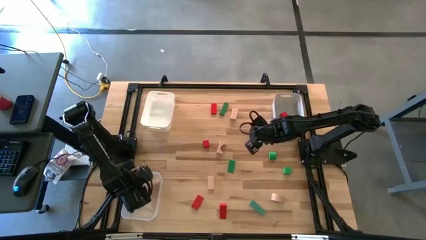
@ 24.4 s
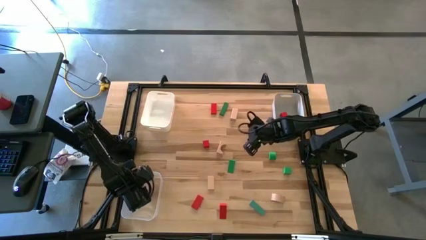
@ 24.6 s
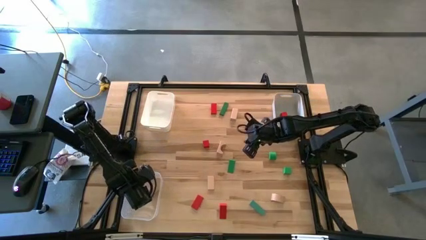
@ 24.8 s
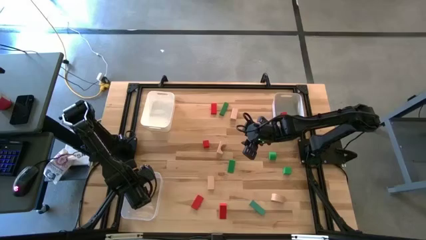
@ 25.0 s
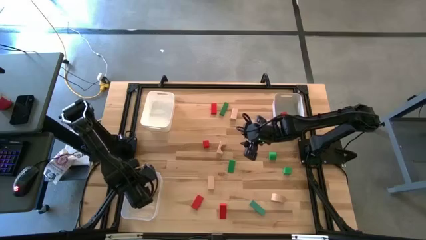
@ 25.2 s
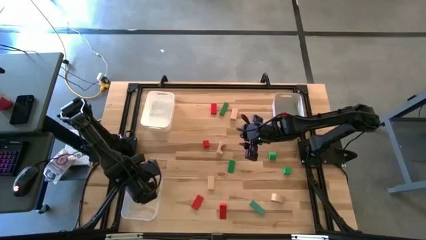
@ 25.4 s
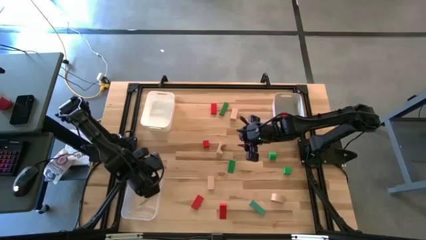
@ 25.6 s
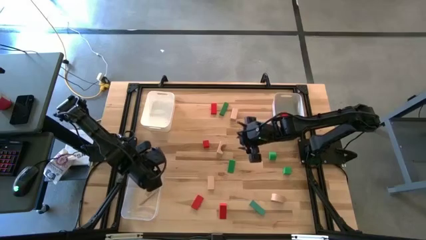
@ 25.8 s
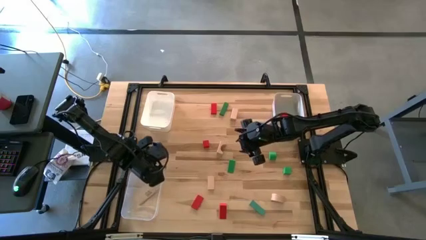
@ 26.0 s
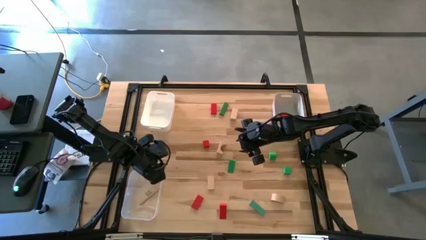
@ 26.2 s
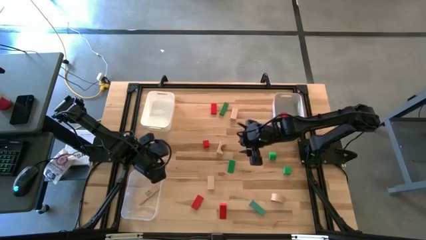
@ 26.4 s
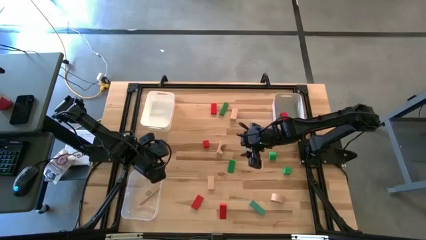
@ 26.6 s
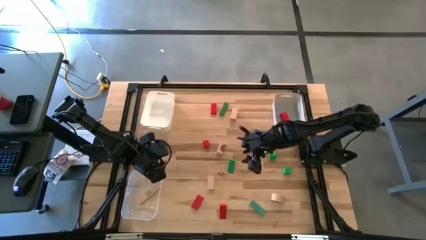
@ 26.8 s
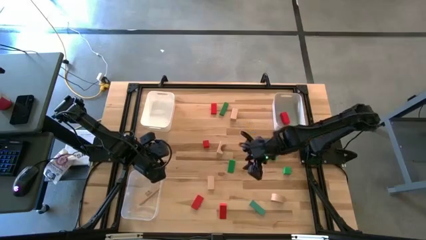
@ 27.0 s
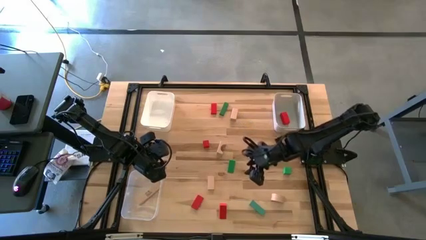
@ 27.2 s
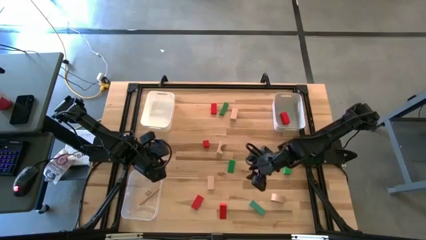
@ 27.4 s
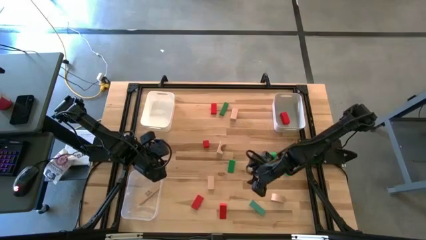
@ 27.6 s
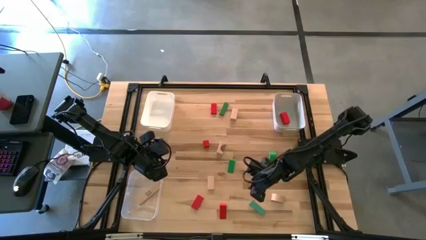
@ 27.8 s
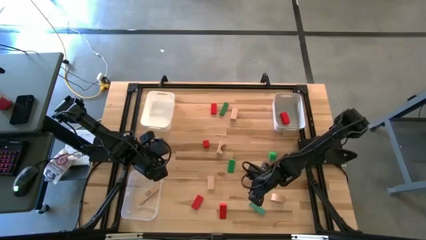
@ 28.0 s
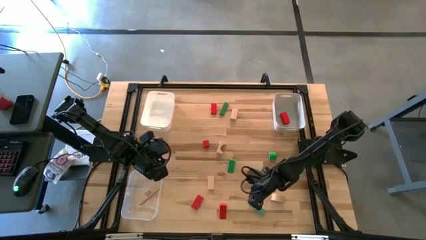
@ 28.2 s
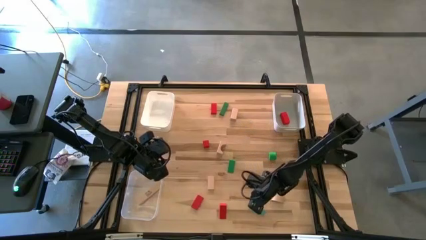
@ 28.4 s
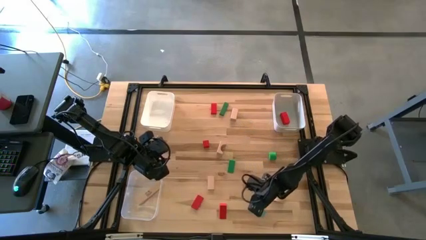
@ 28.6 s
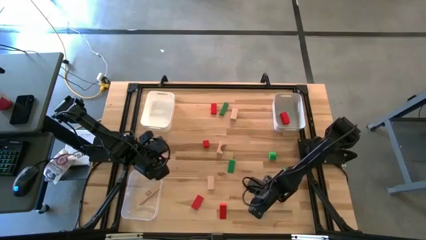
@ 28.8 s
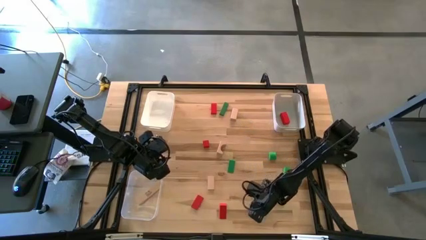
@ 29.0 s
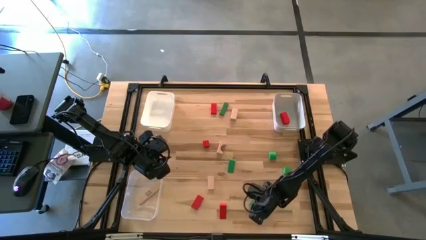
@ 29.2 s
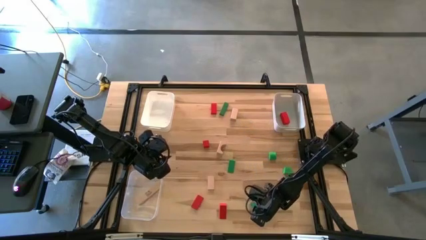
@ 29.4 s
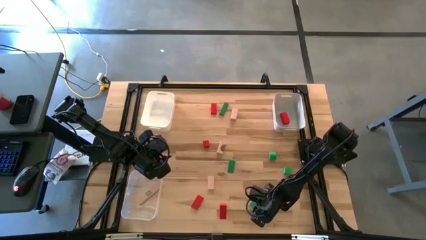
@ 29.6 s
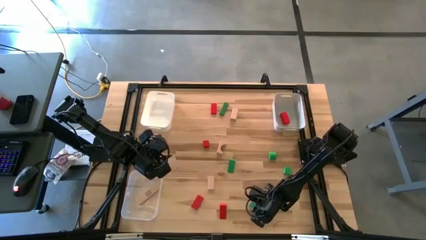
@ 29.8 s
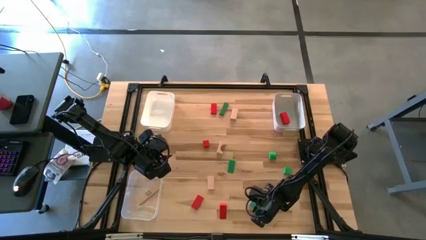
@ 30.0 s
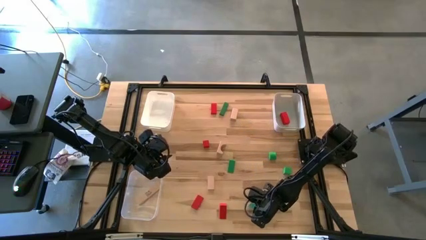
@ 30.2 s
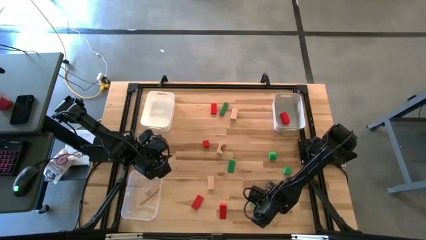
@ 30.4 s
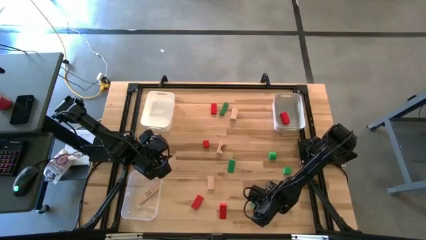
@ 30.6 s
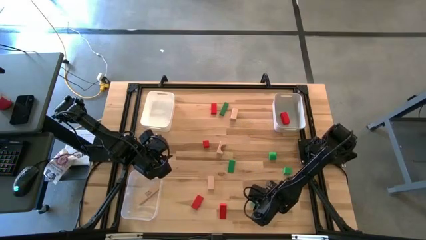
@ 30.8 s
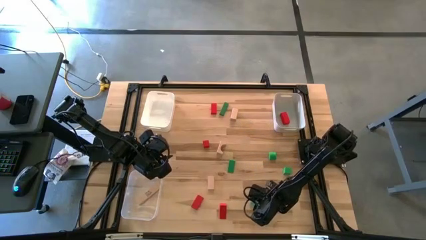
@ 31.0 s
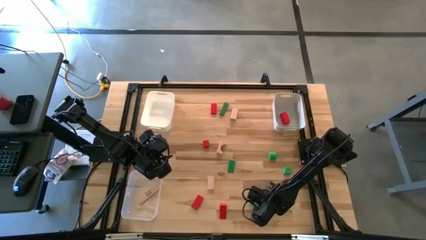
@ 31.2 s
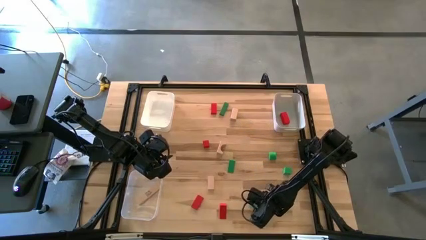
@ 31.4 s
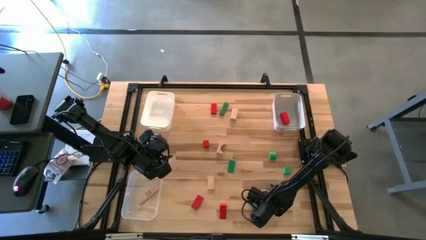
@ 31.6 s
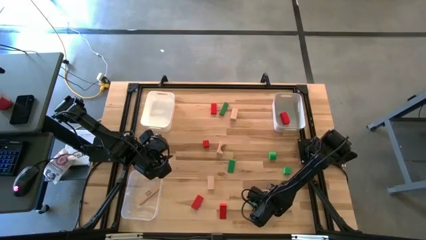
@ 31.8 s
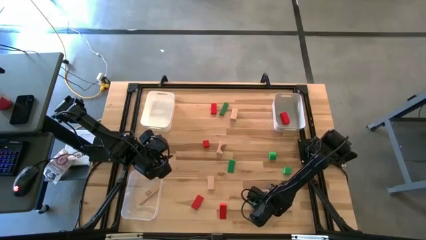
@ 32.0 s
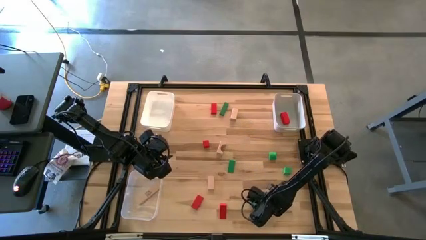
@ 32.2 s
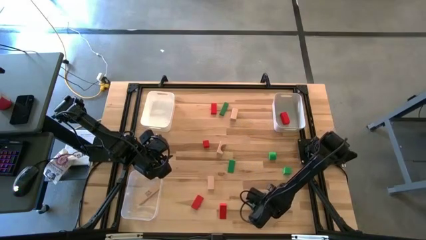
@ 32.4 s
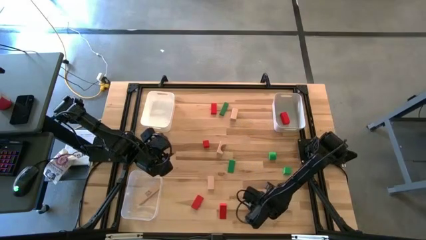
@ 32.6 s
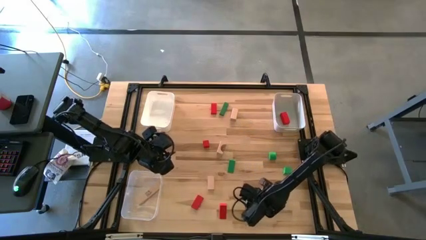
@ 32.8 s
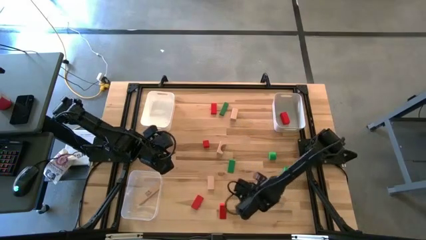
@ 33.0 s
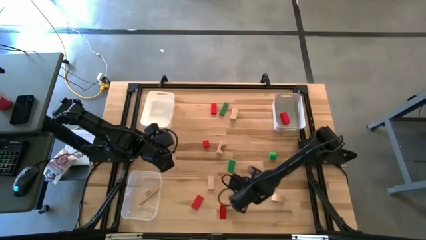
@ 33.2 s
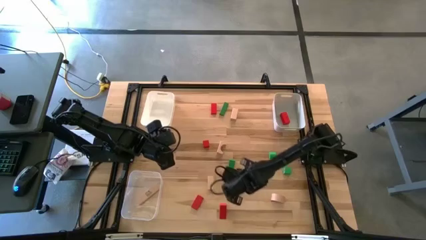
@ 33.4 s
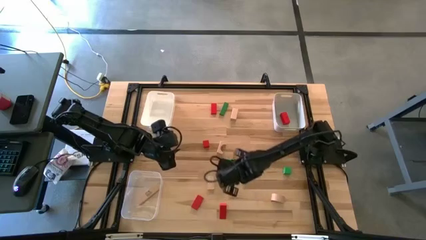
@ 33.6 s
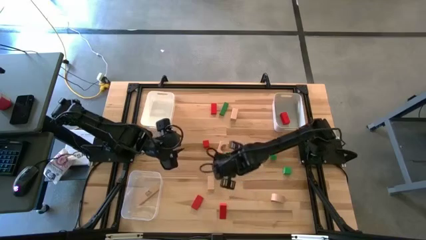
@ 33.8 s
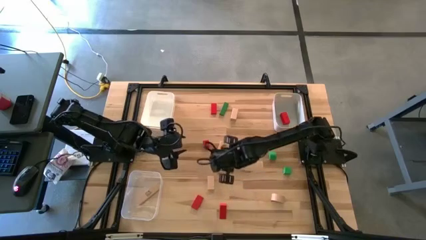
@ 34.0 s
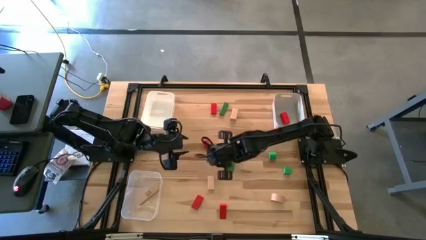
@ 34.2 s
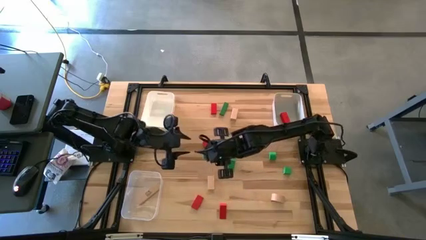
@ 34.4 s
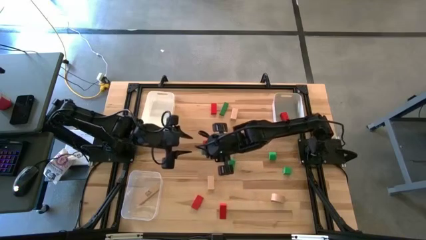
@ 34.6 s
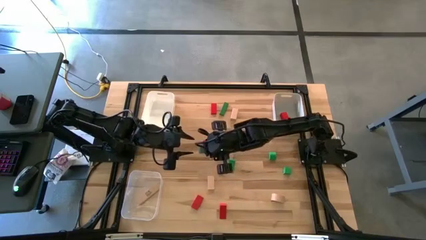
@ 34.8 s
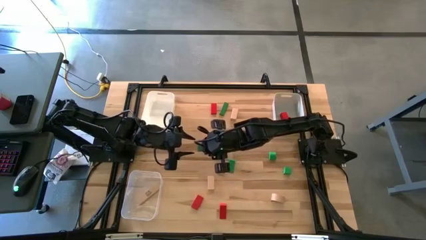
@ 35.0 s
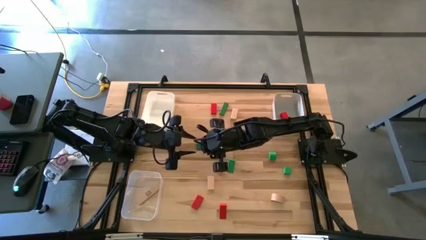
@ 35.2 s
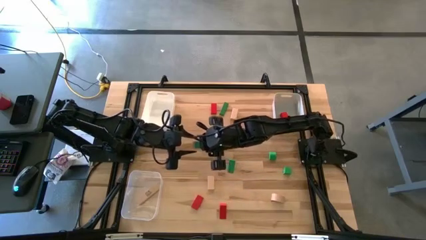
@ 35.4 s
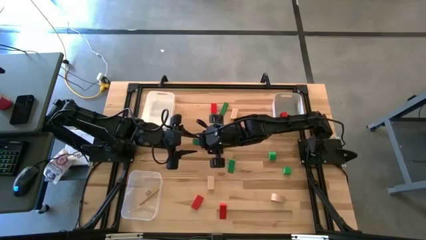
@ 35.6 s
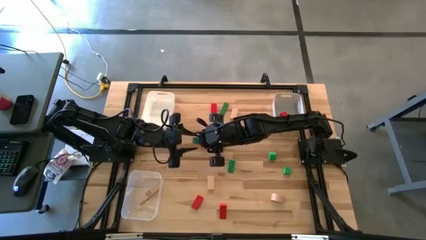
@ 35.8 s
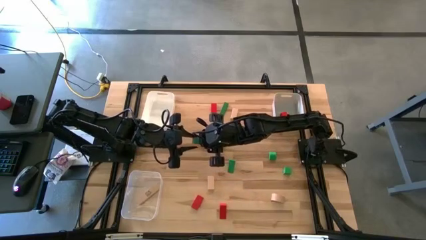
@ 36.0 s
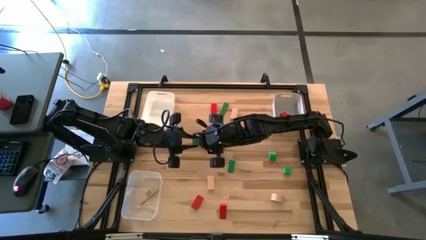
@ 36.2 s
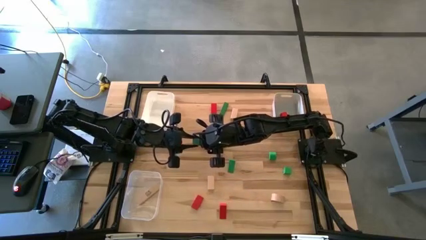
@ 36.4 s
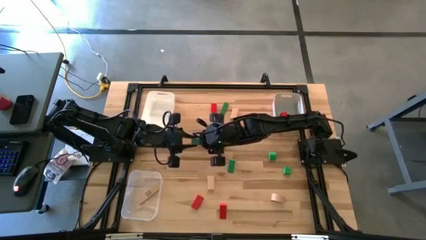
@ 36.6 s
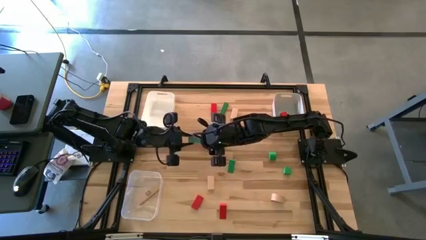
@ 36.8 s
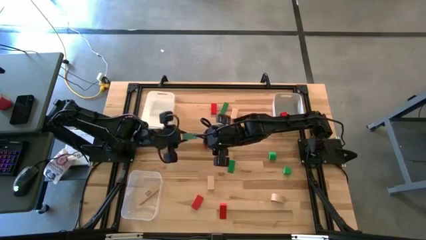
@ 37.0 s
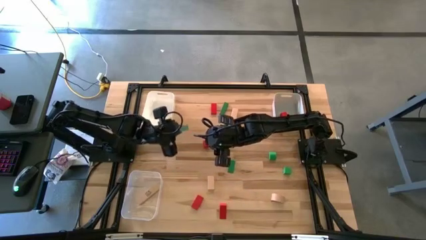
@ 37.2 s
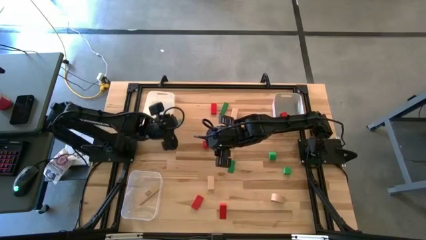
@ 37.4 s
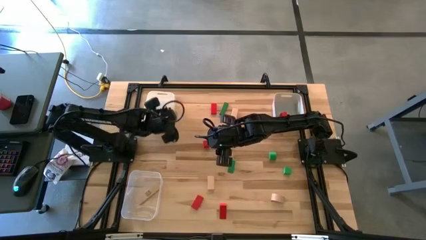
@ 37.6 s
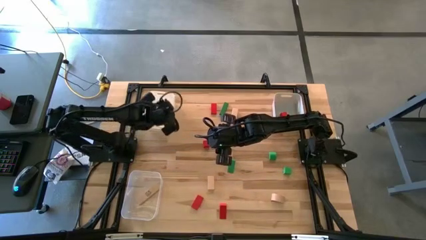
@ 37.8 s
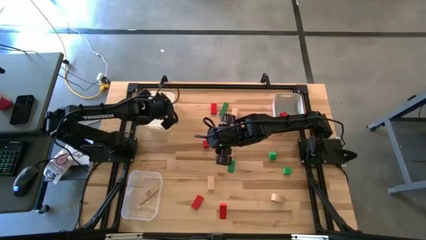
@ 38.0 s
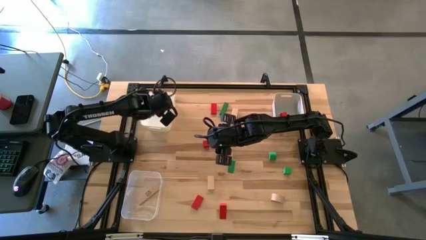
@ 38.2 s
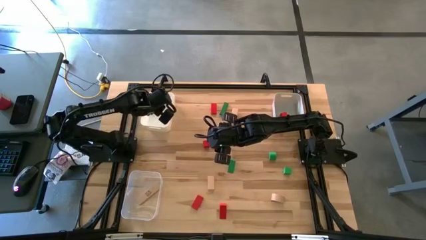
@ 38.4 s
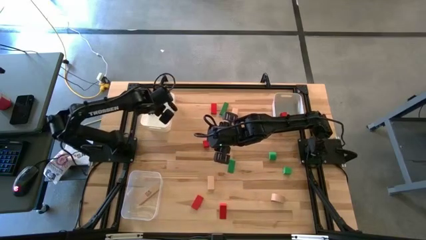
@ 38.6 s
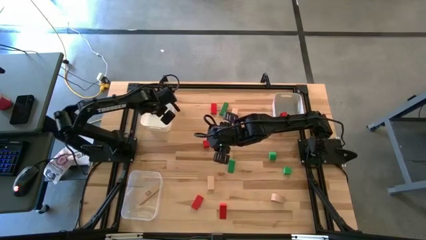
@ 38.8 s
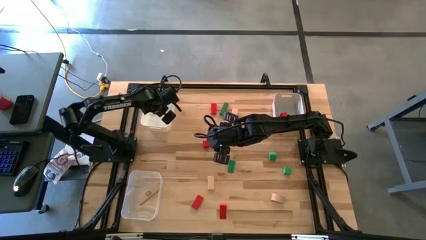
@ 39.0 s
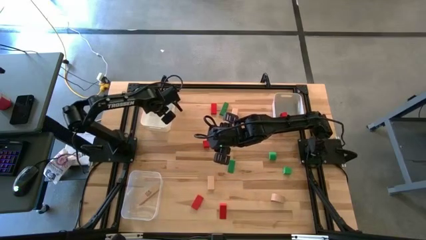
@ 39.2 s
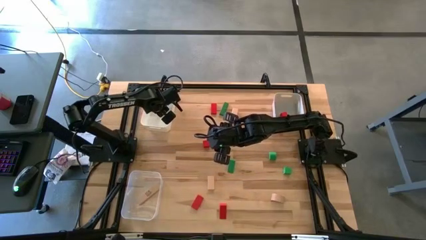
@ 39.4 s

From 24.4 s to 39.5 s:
Task: Sort & place blocks by color
Put the green block into the white bin
